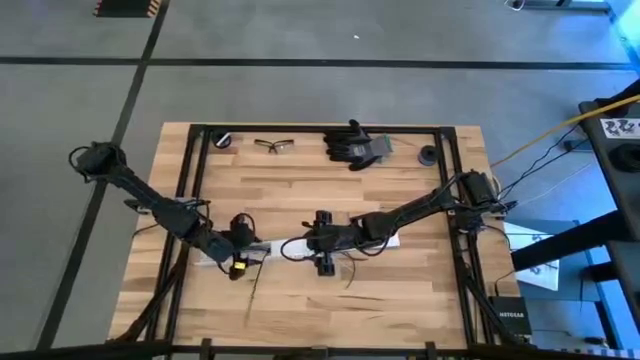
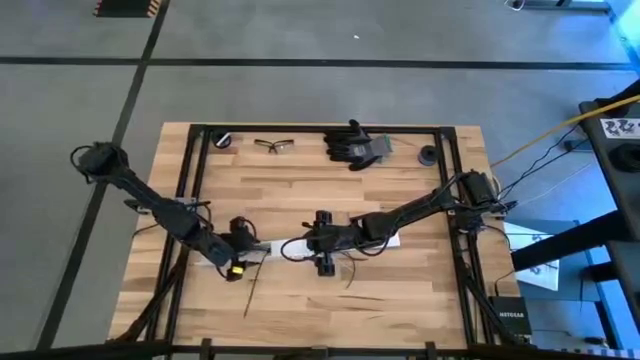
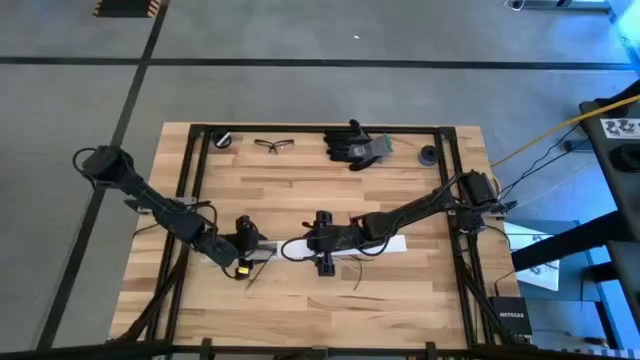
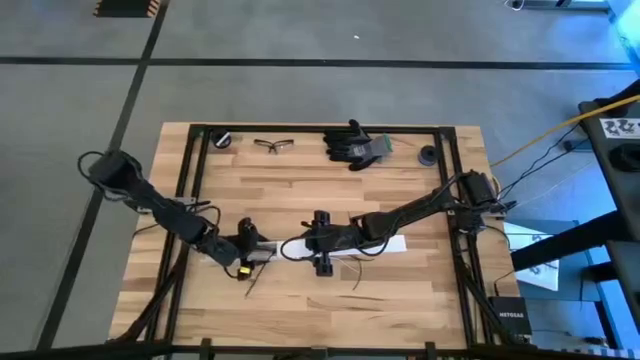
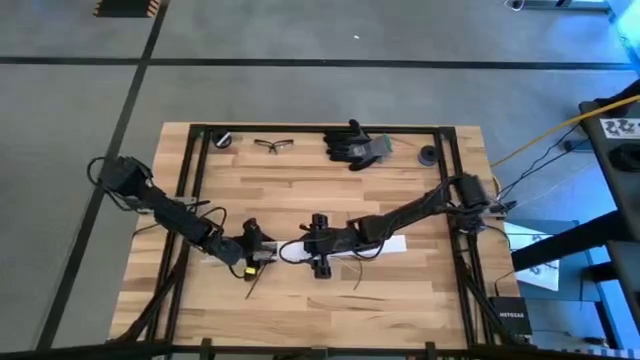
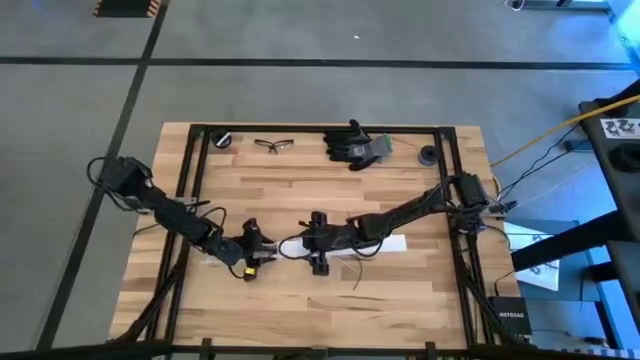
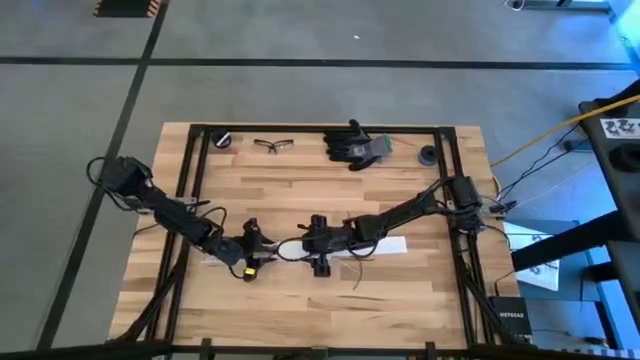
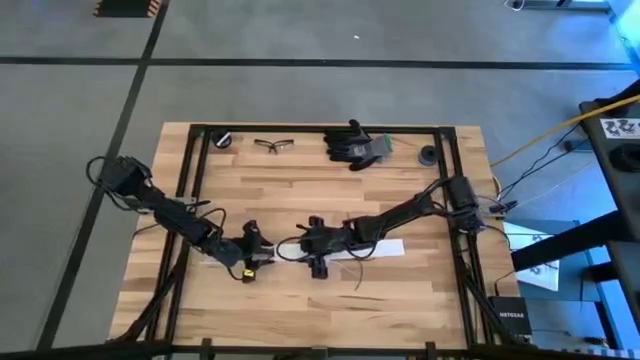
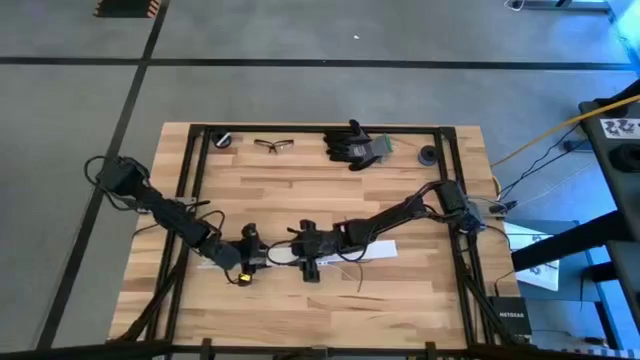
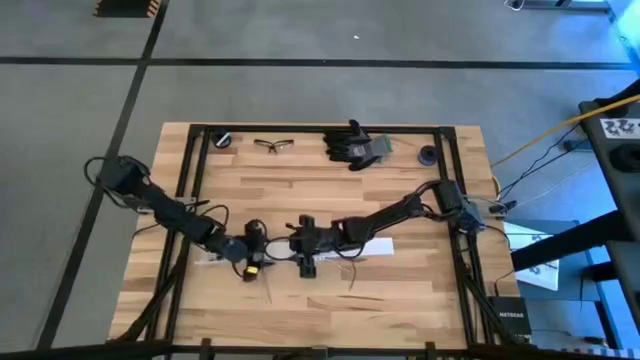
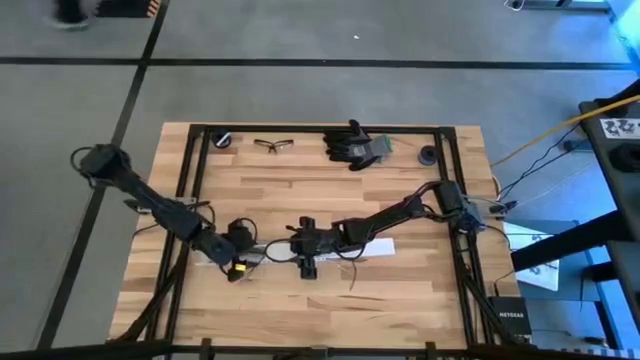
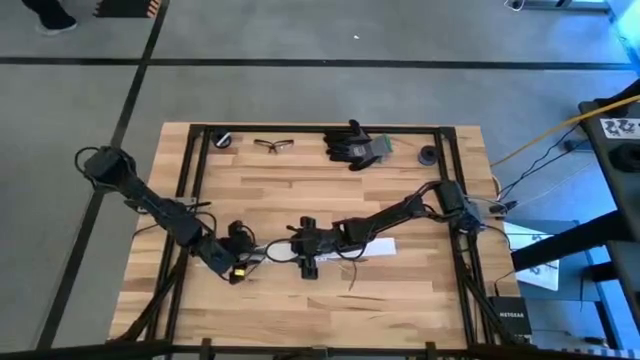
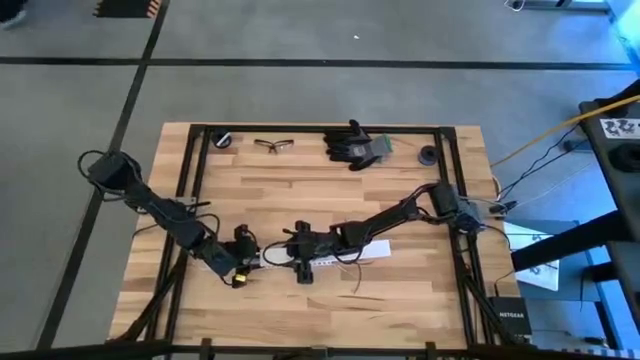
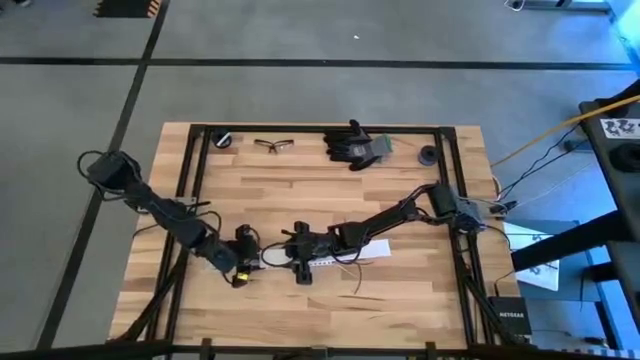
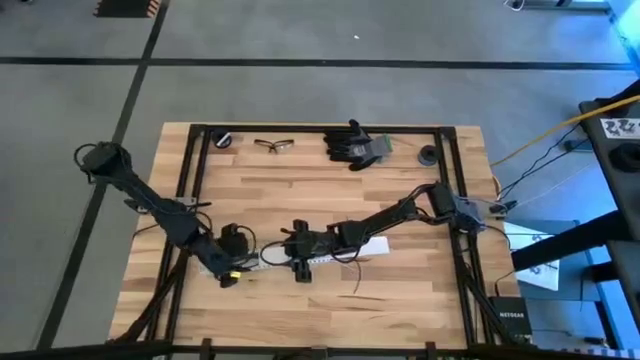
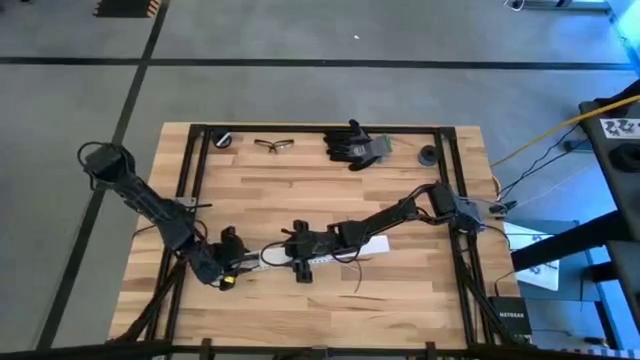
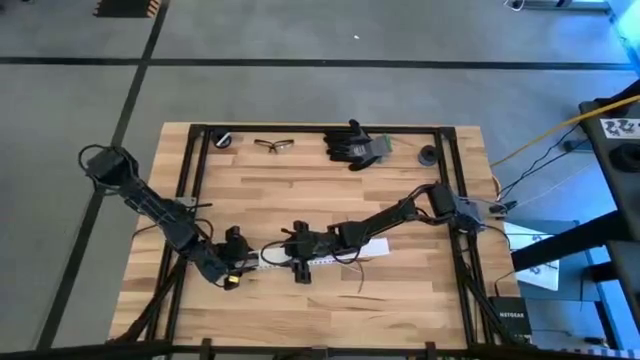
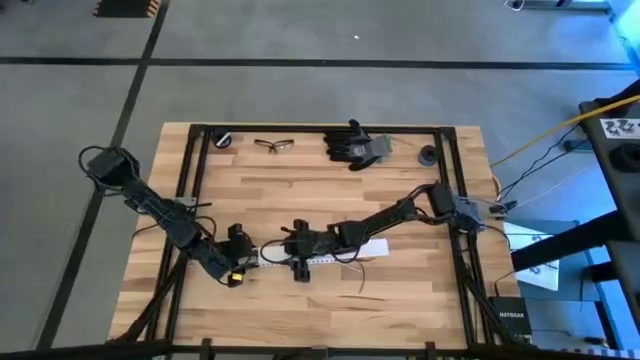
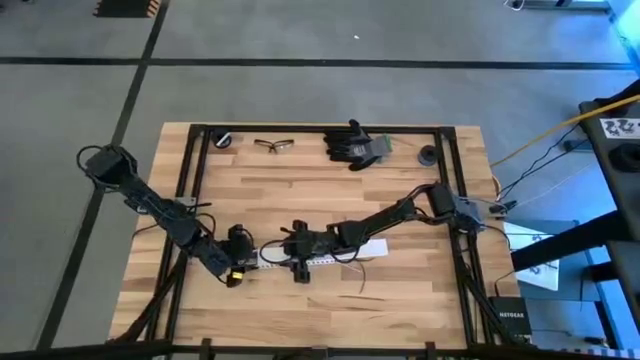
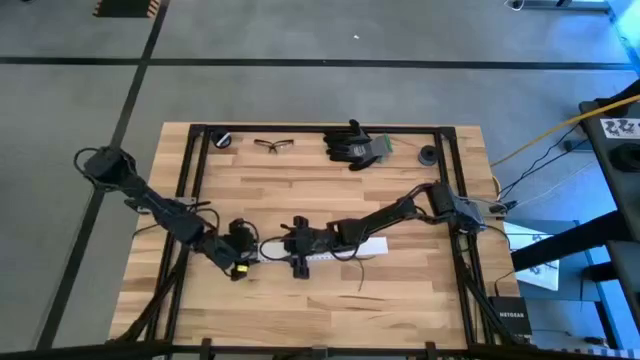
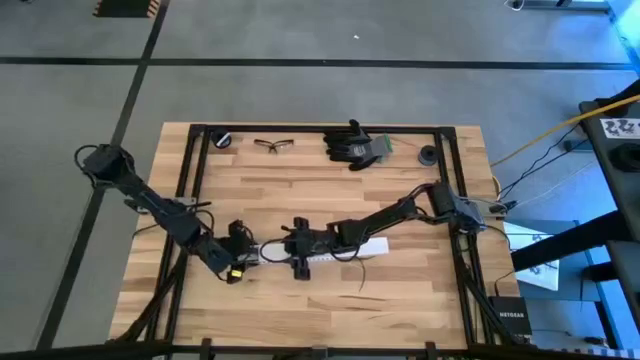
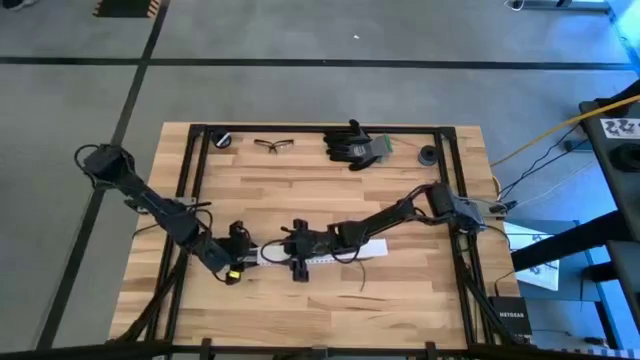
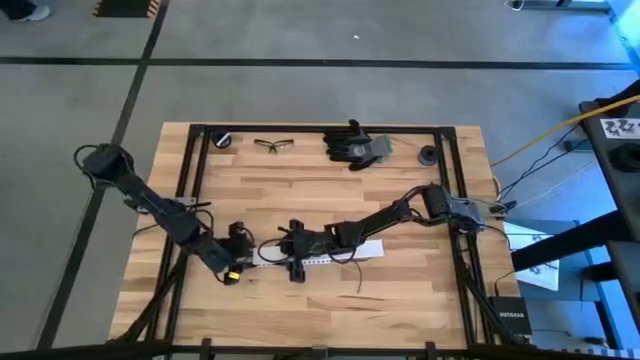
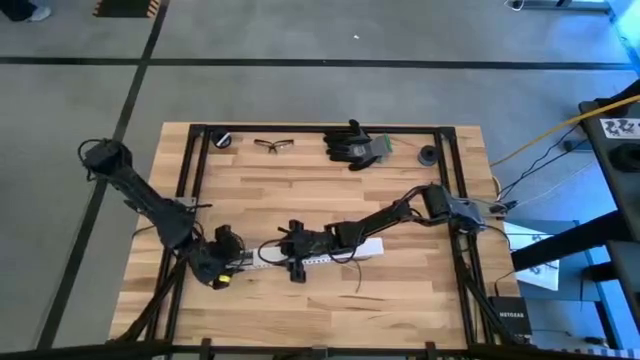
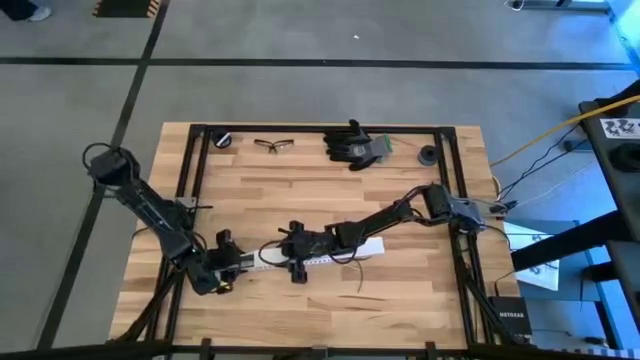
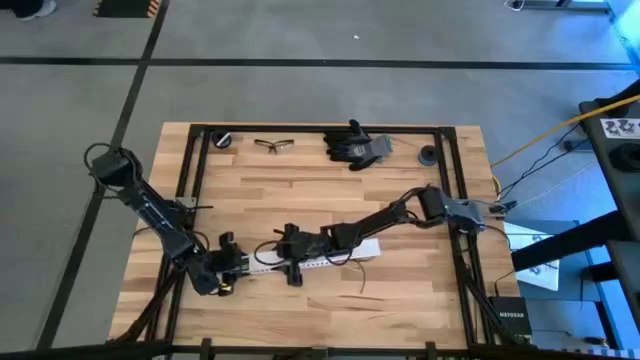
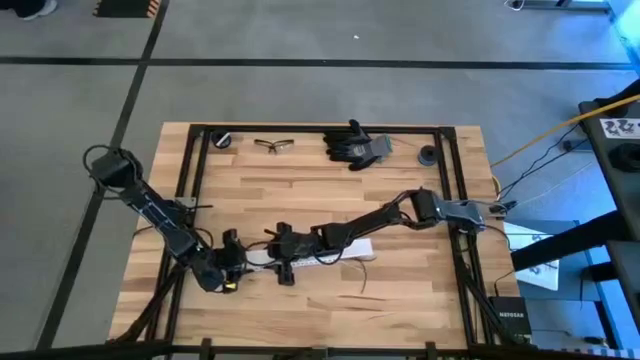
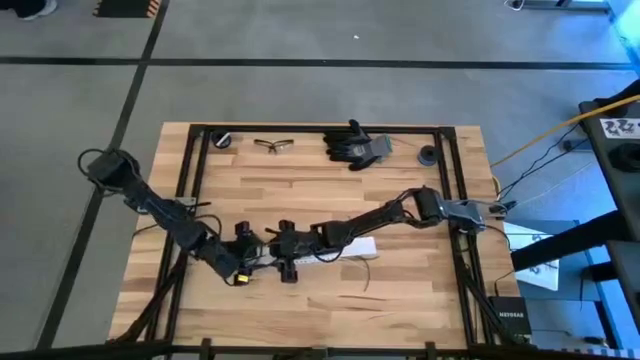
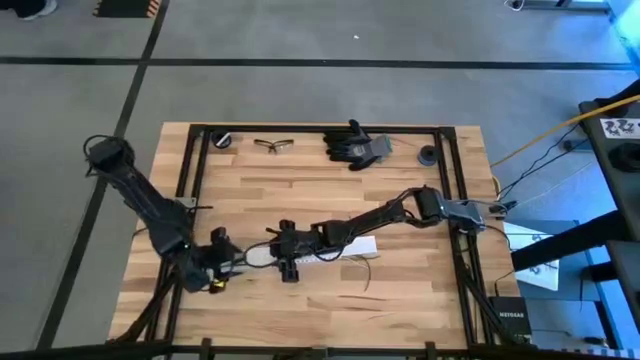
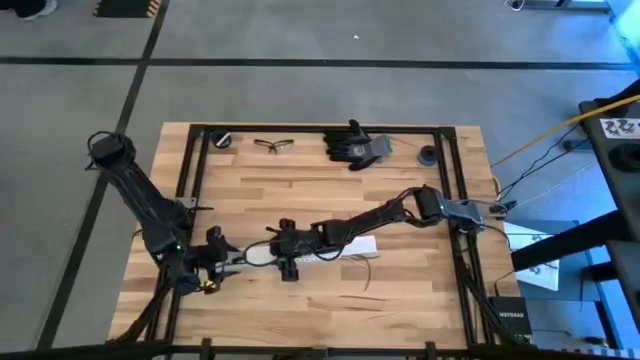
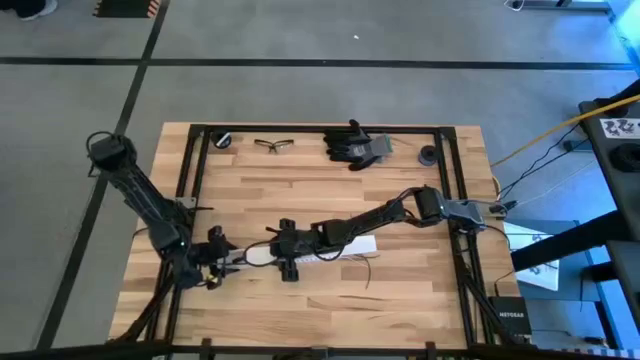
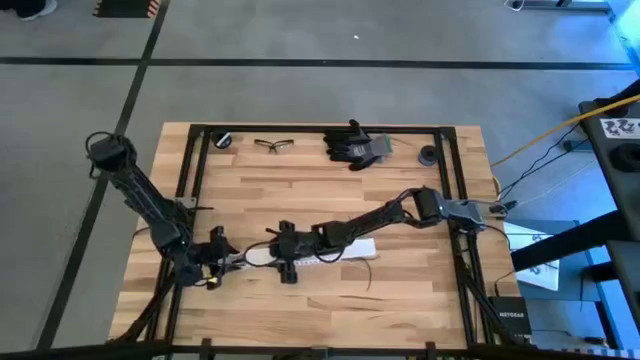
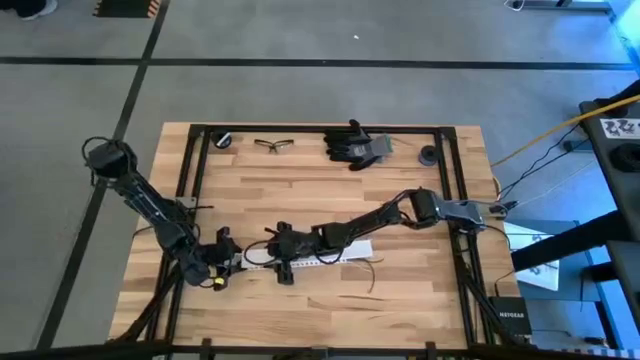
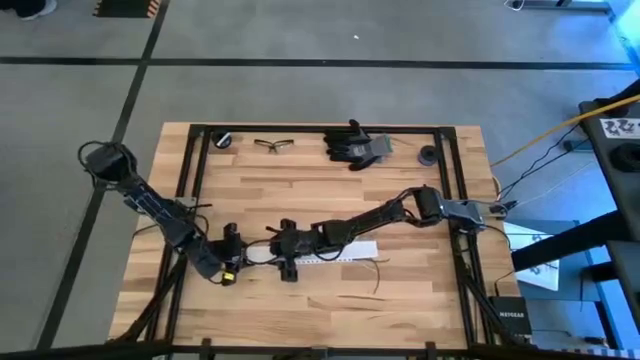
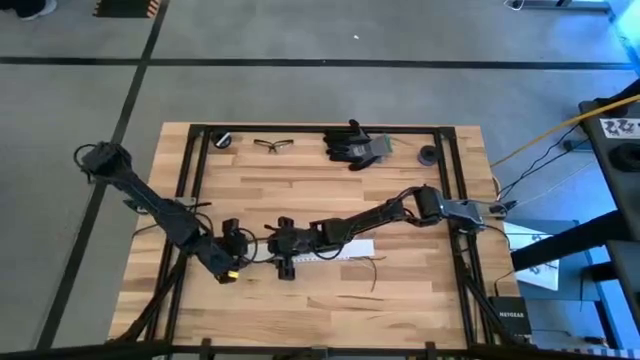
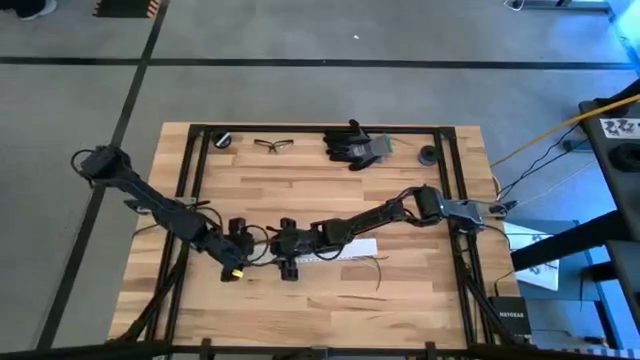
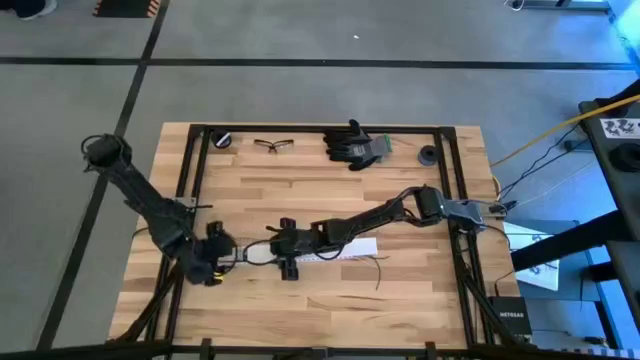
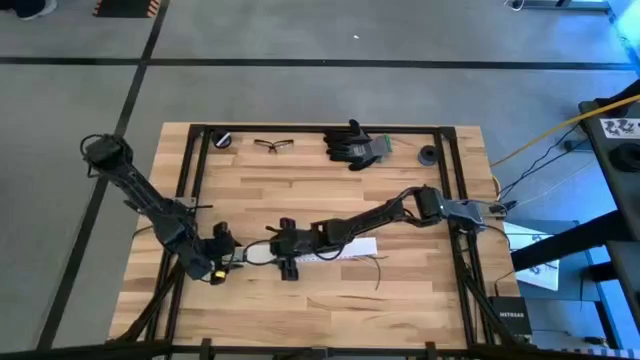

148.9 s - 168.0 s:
Task: Ziptie cables
Close the white cable duct
